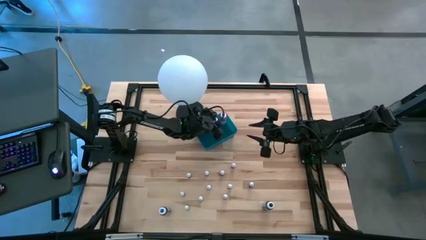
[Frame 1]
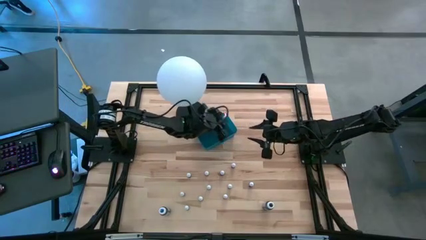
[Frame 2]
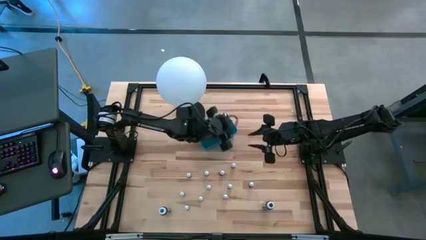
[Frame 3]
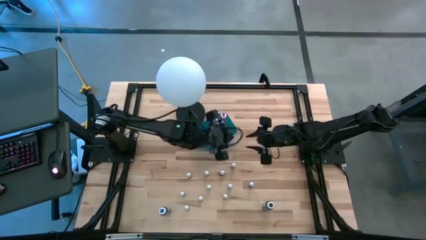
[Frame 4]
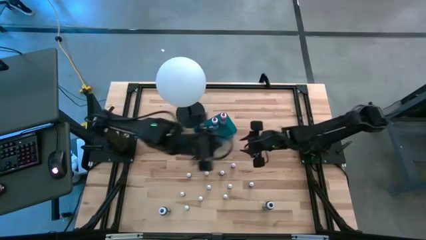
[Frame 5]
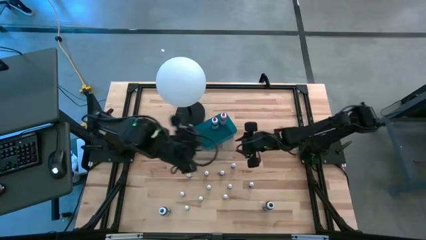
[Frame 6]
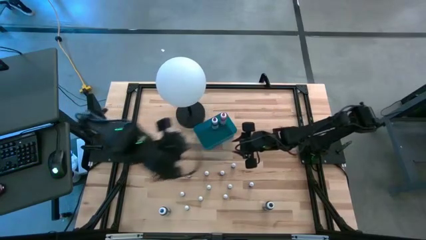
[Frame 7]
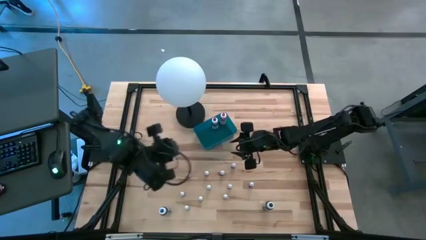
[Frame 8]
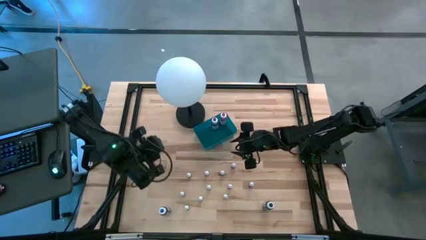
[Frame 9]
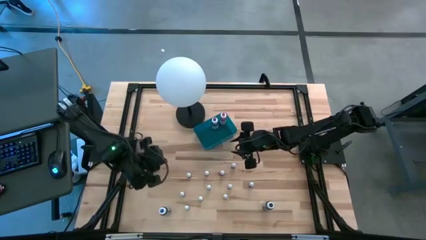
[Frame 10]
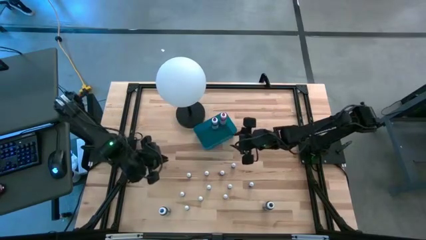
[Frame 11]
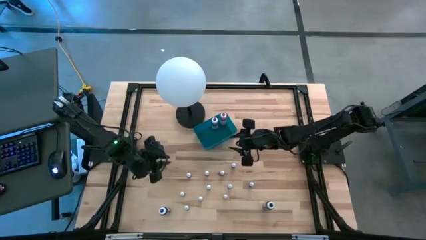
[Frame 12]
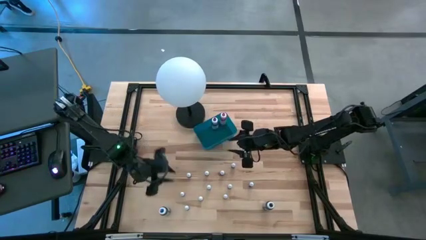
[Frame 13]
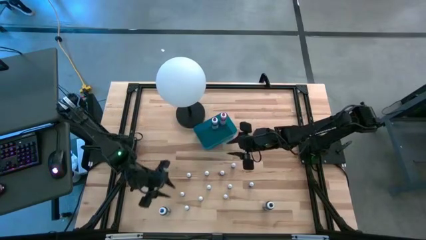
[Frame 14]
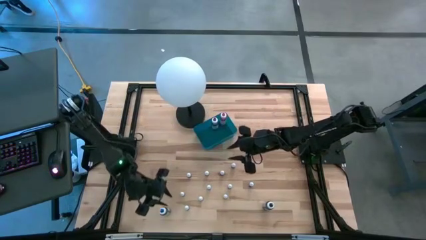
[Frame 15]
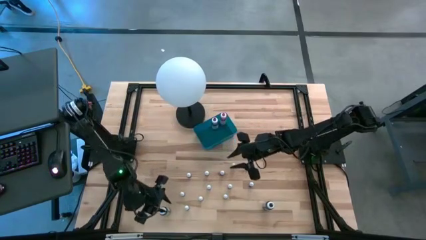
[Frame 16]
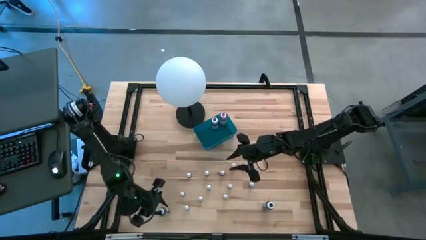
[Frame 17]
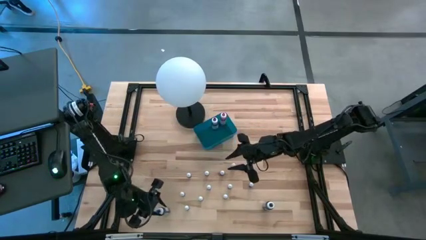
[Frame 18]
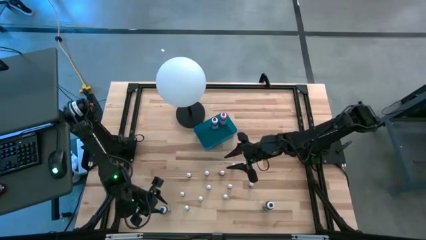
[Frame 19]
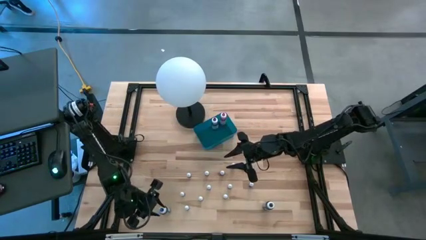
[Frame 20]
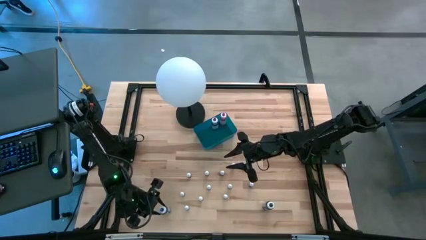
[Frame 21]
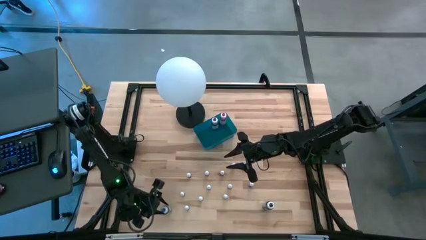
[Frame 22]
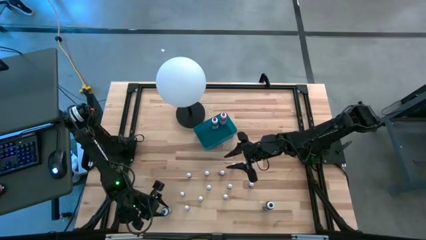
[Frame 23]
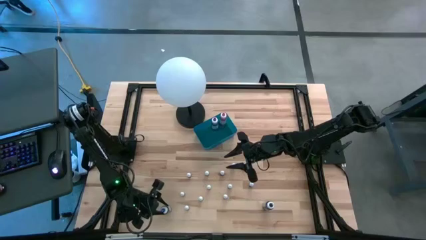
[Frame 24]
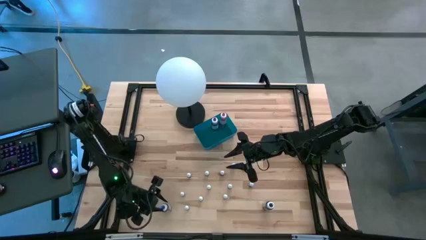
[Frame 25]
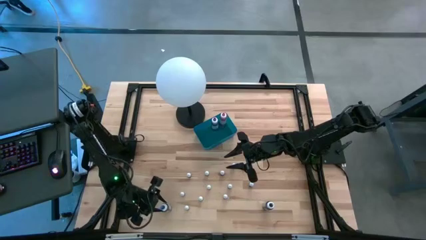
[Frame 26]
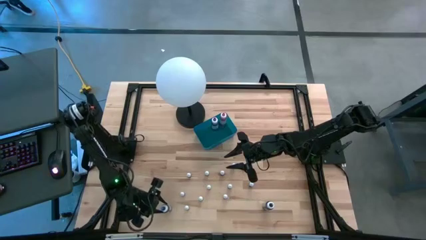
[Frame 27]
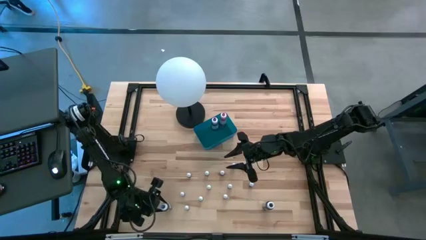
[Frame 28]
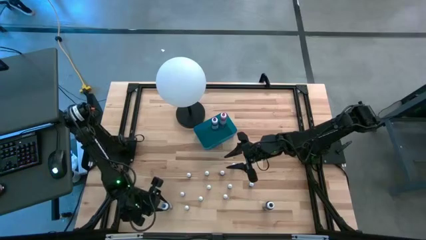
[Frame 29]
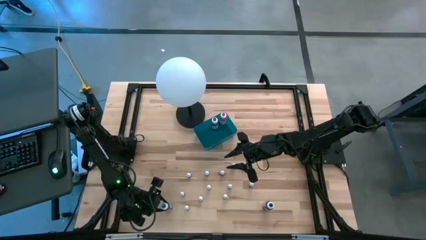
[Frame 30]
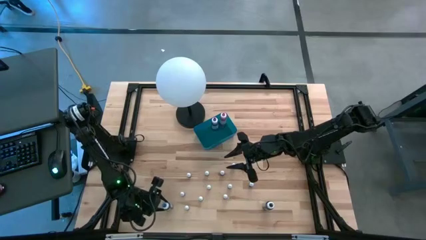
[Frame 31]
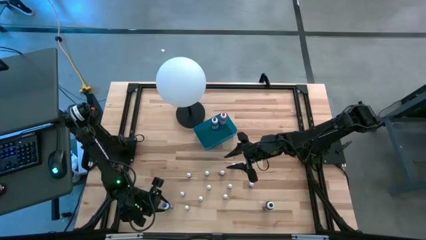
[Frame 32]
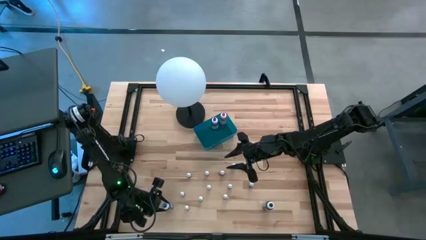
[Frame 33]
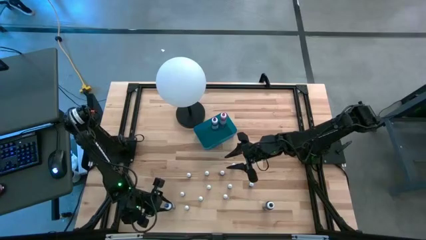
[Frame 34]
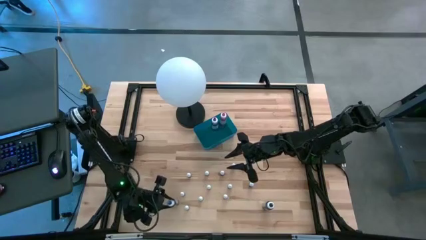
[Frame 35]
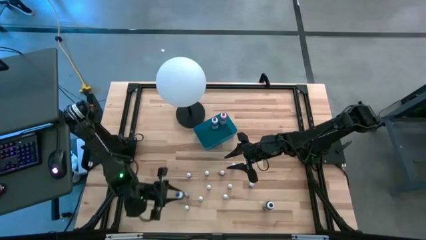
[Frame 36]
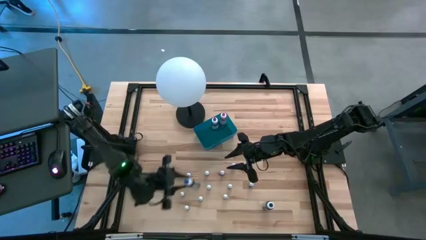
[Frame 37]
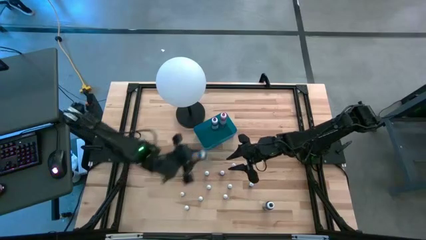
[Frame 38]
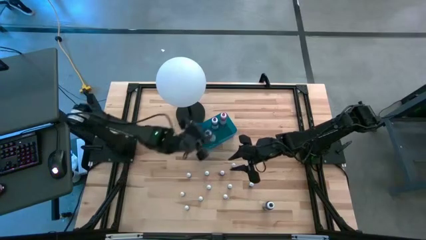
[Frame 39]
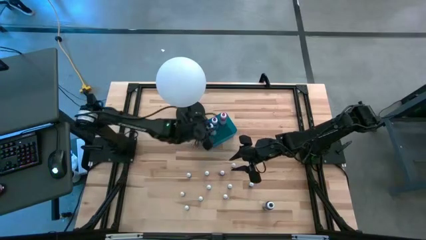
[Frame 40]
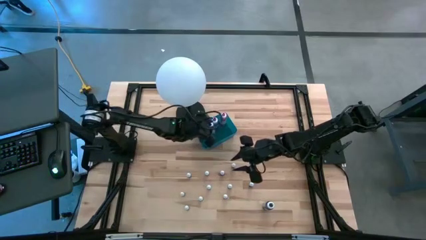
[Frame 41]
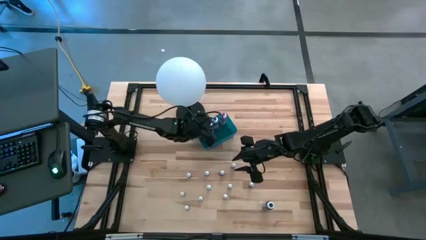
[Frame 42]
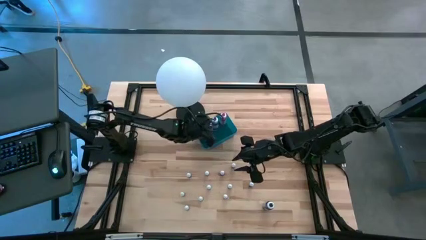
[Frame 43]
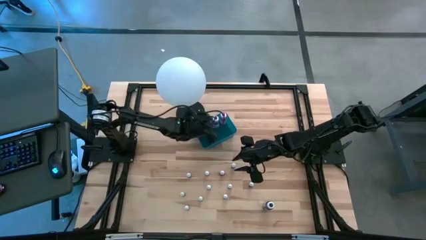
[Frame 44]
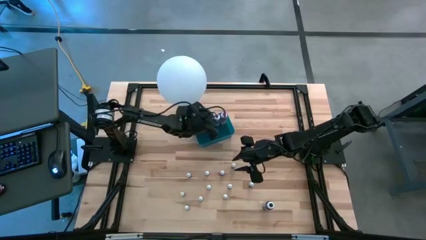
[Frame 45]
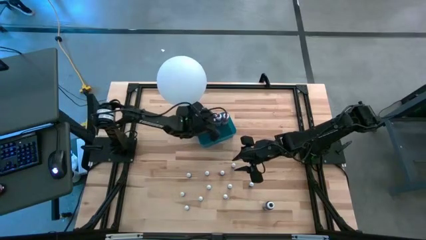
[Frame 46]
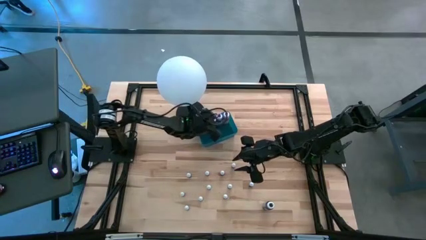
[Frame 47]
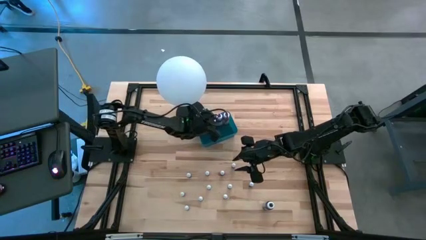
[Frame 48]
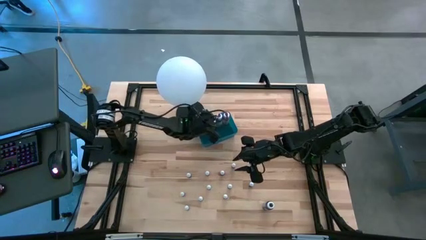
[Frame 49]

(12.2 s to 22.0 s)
Task: Pick & Place food coloring
Put the large blue food coloring bottle into the bin

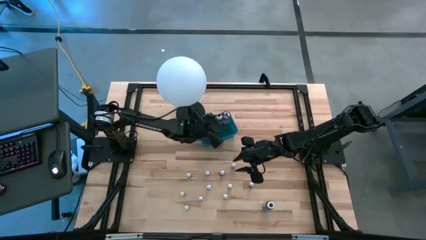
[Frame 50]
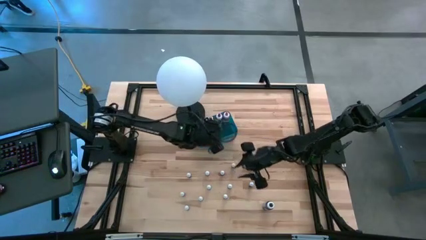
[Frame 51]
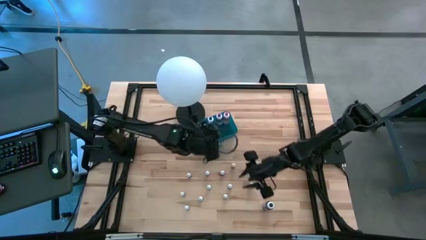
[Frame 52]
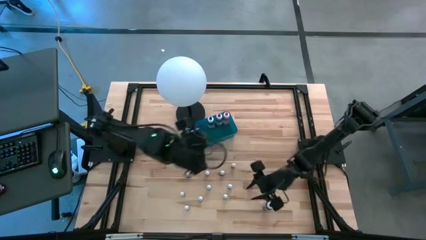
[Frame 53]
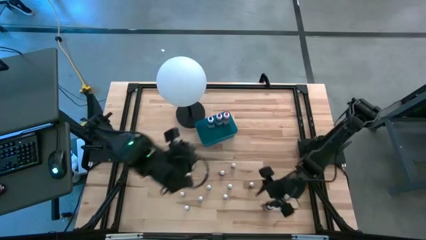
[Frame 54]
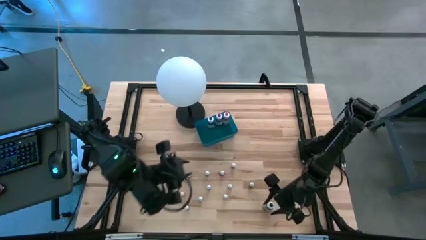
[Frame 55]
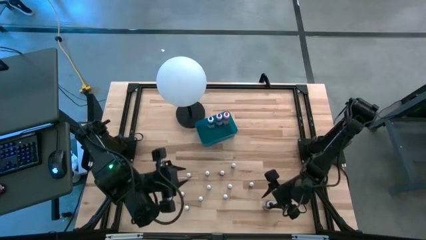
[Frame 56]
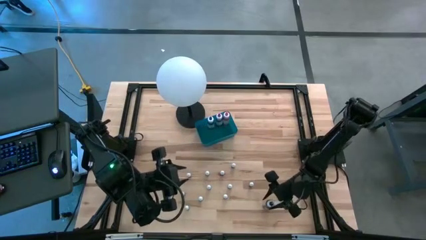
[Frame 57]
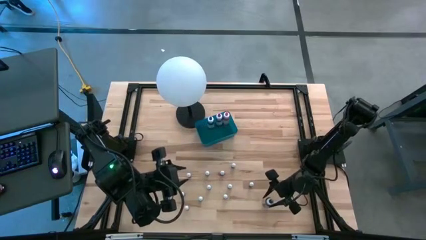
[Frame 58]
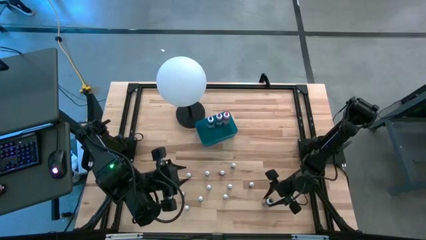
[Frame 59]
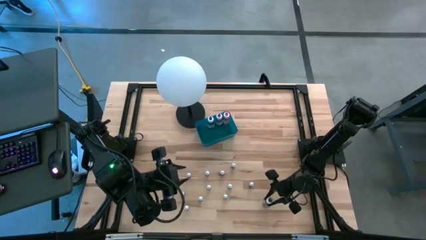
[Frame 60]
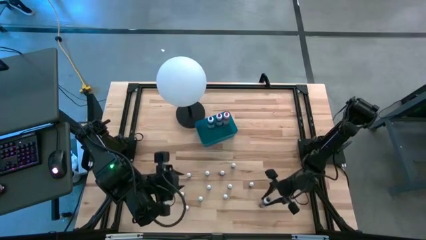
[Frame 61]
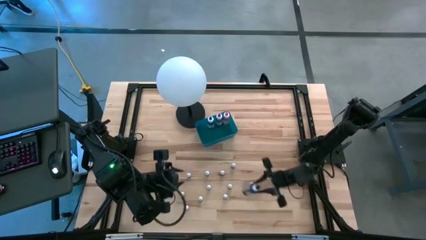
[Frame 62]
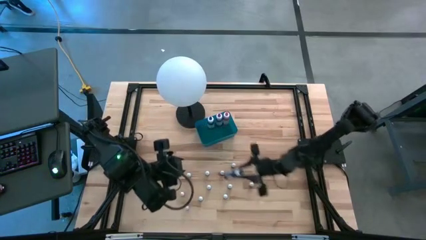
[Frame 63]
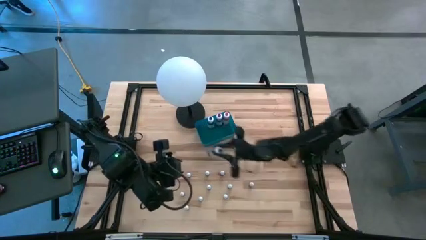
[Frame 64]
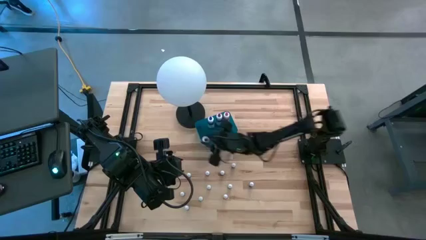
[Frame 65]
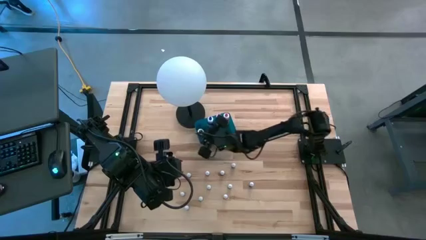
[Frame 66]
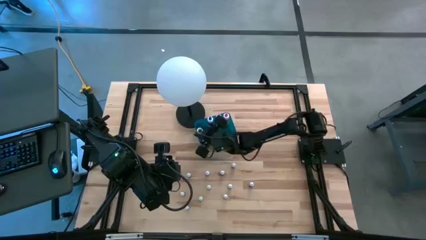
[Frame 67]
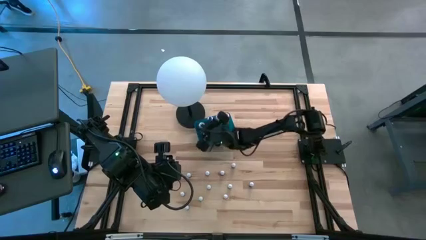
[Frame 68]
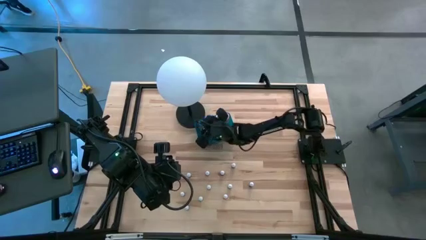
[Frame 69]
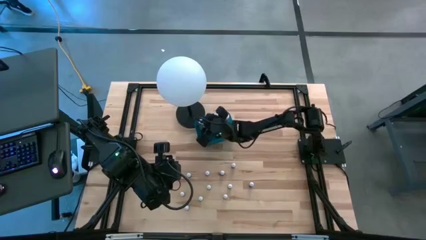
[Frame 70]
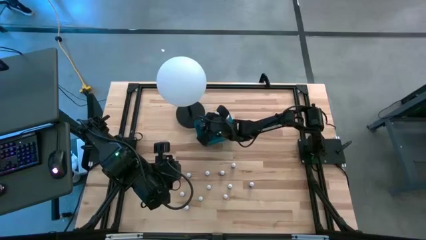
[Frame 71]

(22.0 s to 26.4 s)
Put the large black food coloring bottle into the bin

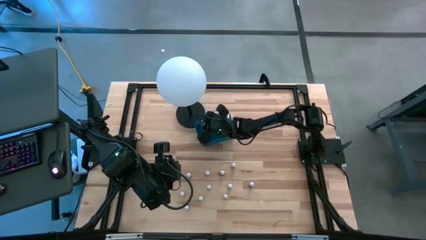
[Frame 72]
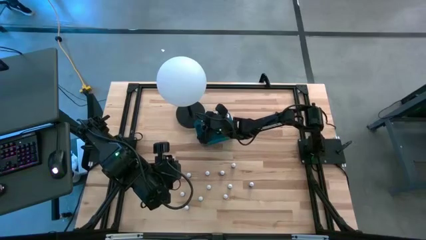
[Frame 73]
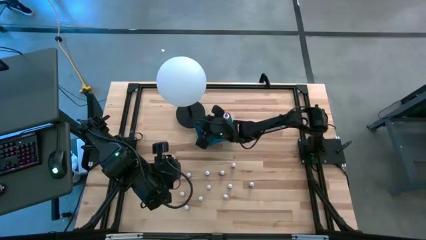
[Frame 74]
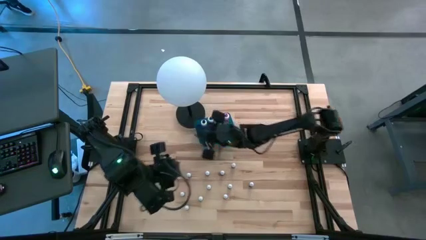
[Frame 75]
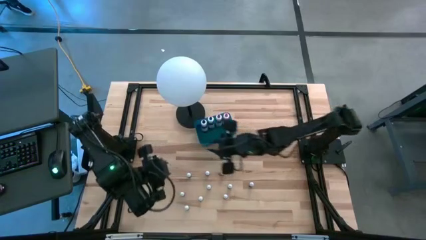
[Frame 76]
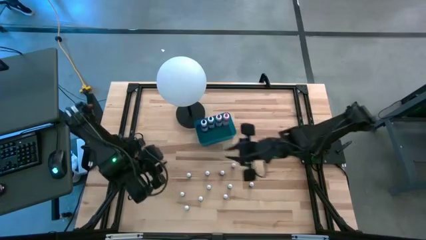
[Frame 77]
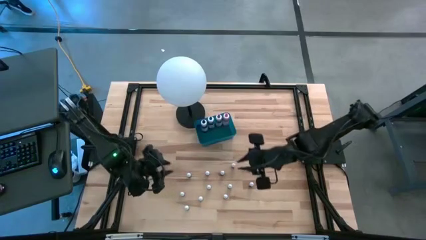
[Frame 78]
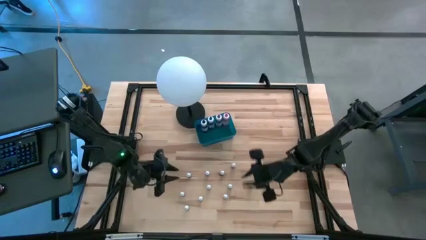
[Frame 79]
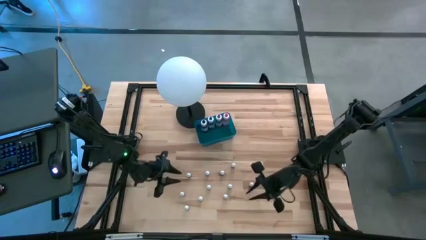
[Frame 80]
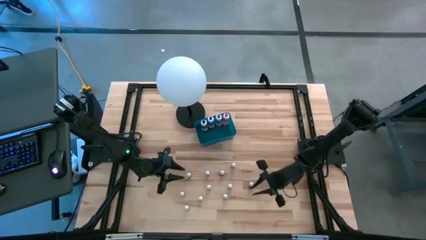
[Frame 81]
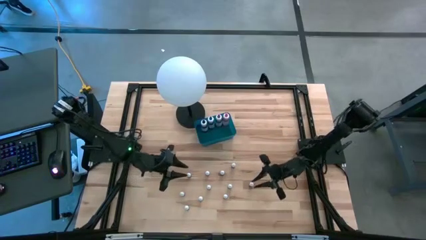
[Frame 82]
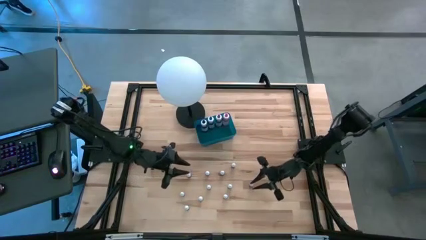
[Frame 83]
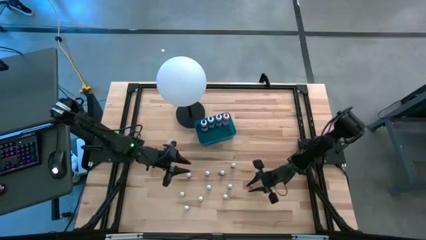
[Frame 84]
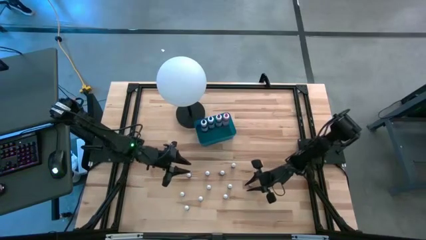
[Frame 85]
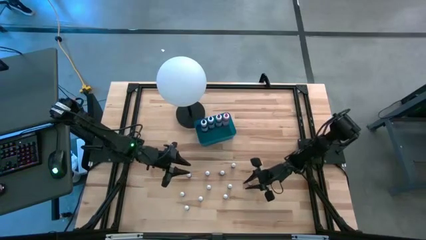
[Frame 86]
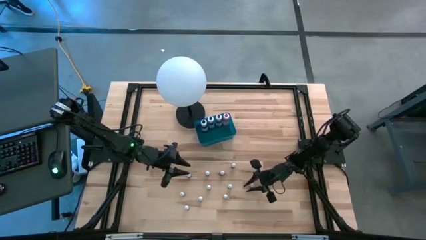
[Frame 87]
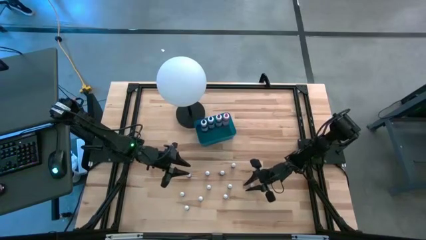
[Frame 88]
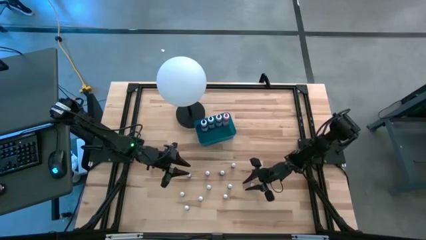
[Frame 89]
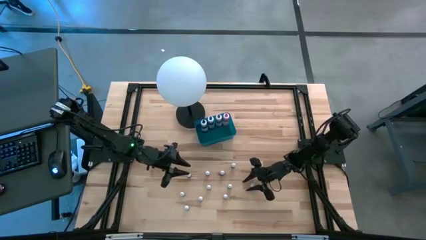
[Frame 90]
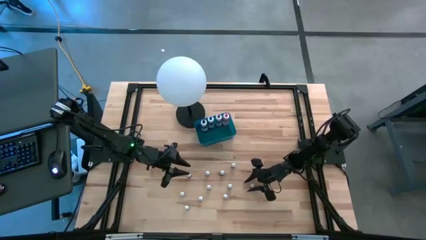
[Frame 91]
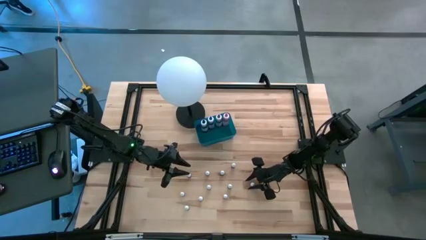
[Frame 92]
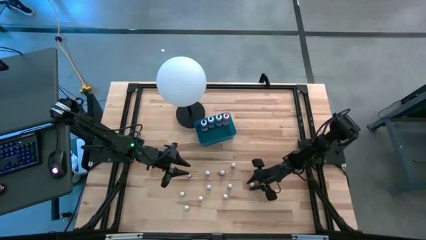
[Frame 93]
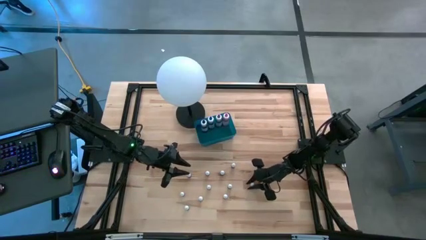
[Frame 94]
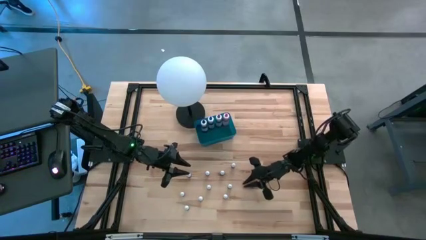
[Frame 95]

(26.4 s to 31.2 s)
Put the black food coloring bottle into the bin
